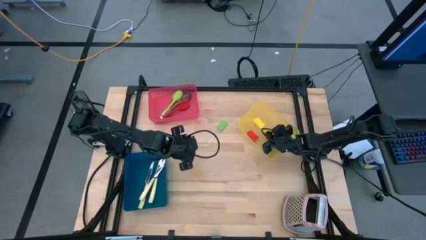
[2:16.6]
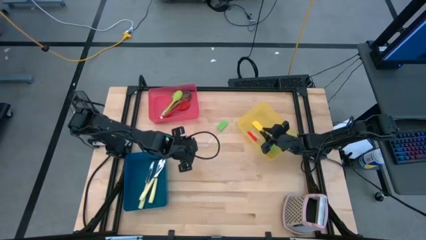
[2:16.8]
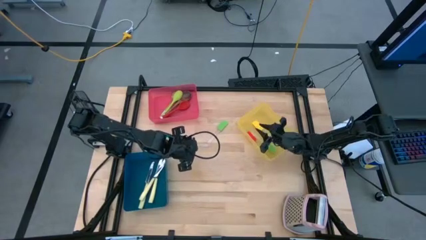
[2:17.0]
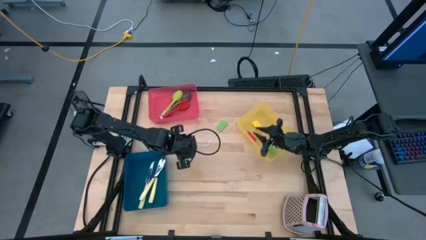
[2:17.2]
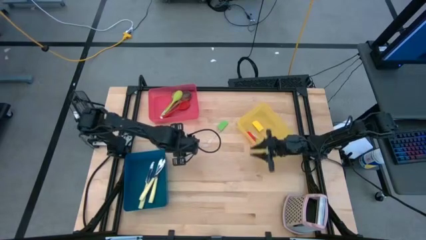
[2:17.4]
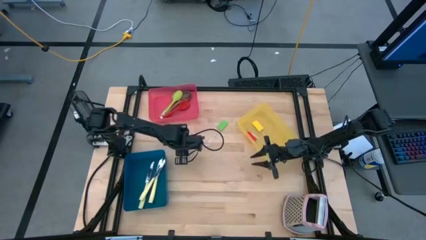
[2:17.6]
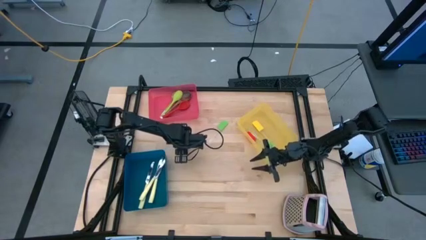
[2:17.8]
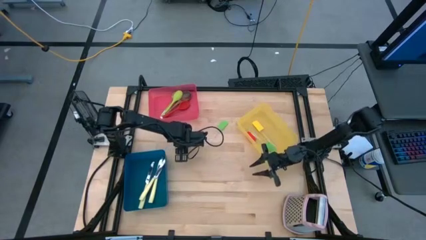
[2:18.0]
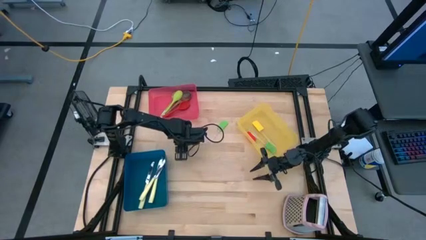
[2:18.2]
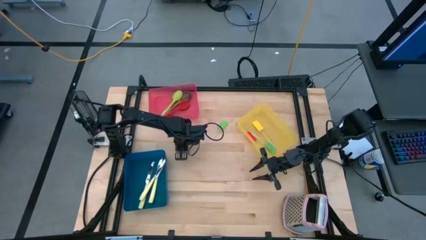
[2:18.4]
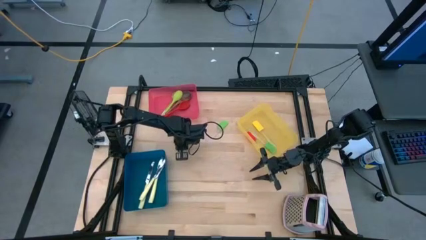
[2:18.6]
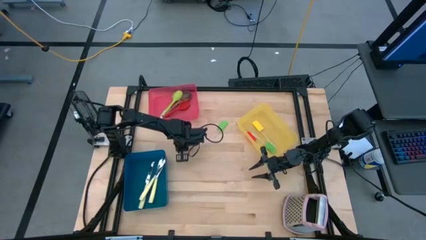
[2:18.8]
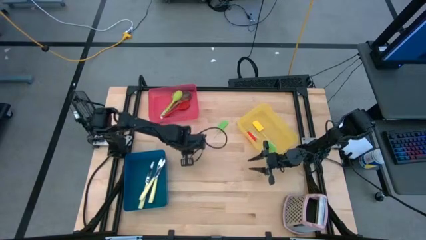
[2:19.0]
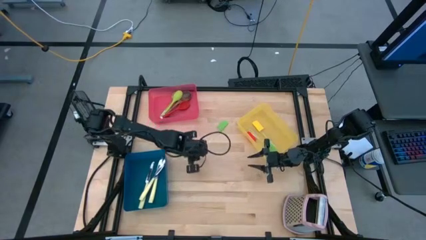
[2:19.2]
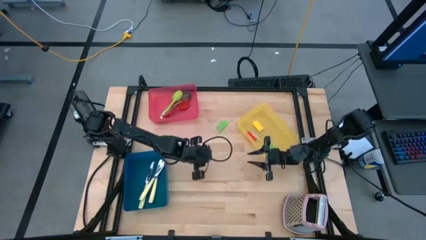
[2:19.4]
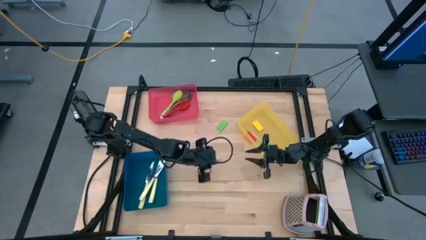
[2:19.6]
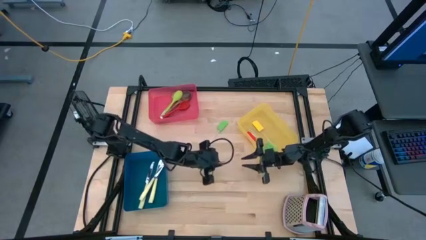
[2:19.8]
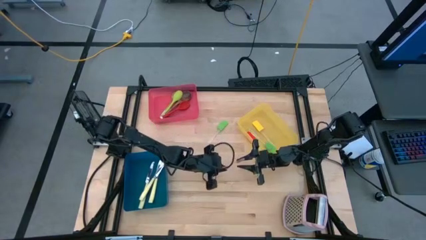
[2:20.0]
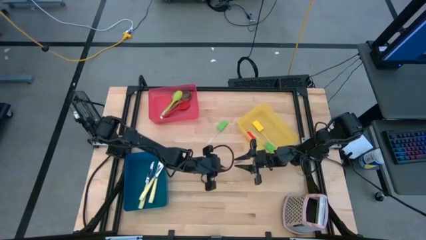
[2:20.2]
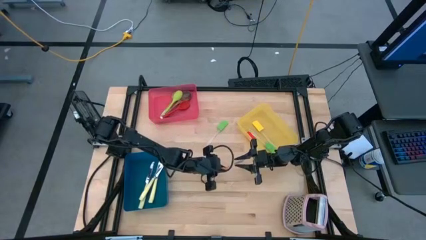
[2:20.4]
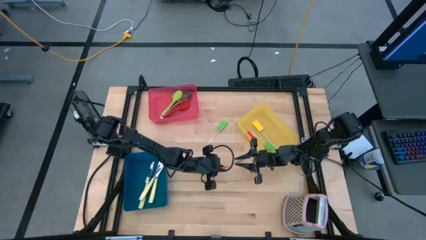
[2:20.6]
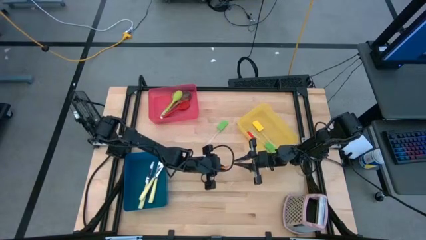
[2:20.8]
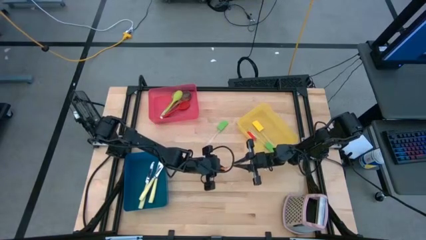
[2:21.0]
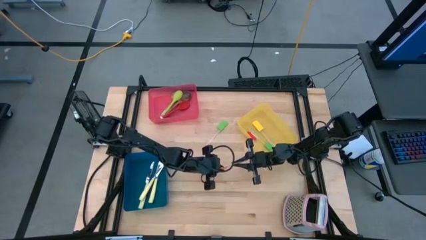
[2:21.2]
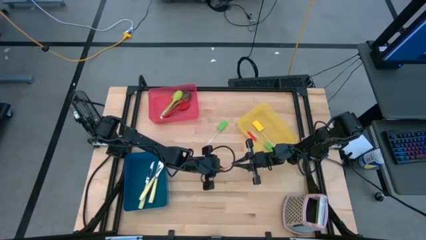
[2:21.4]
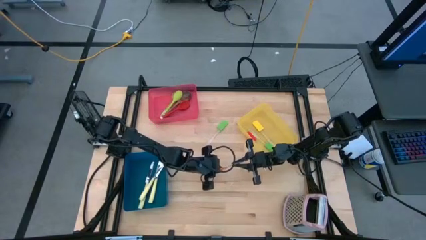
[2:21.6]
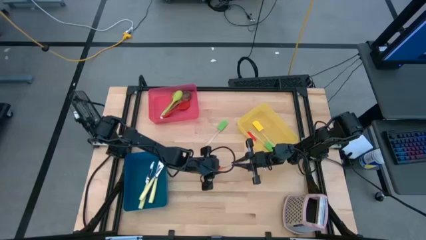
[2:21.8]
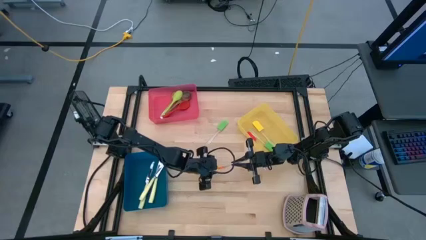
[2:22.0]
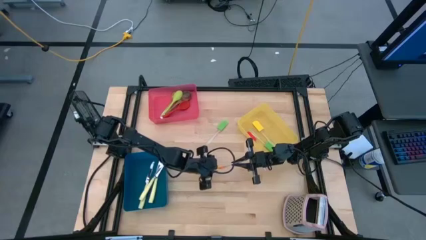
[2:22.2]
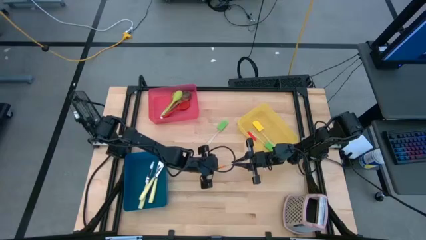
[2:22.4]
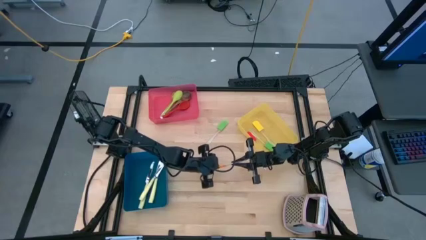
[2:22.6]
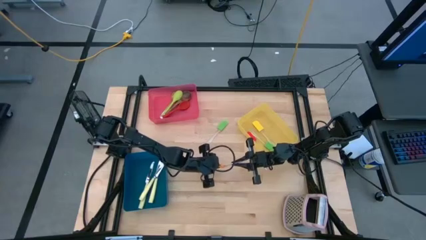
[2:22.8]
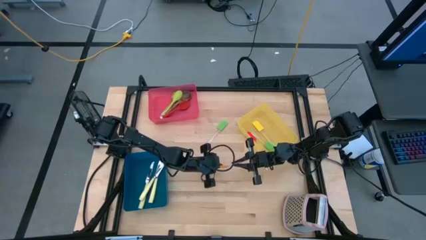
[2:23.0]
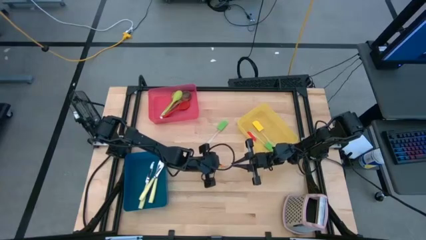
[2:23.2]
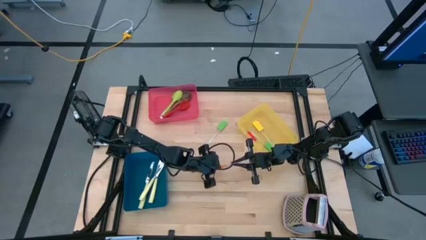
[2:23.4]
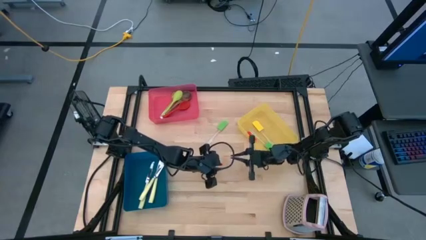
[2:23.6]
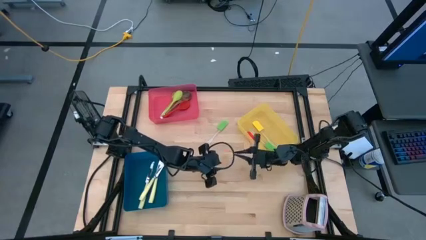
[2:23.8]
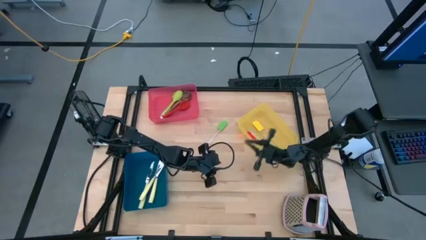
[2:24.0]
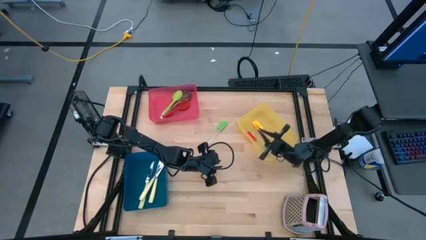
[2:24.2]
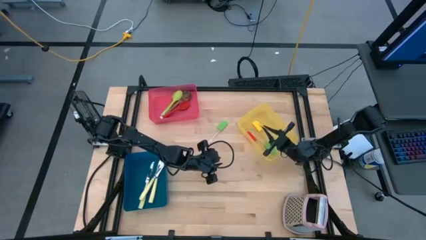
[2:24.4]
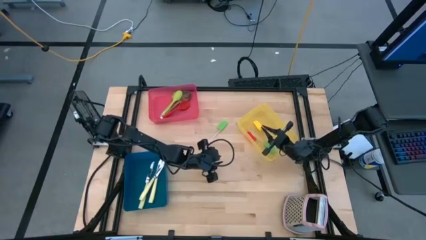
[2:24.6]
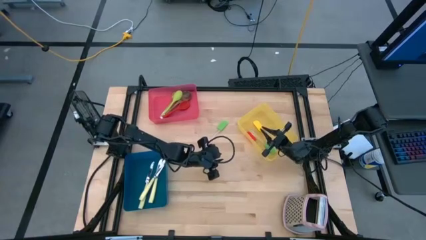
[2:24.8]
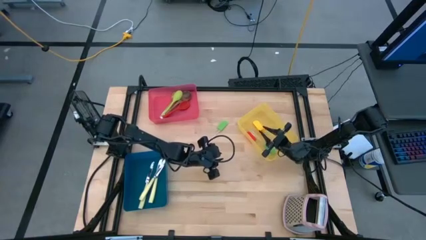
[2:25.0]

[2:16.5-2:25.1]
Task: Pick & Place Kitchen Items
Put the orange spatula into the yellow bin
